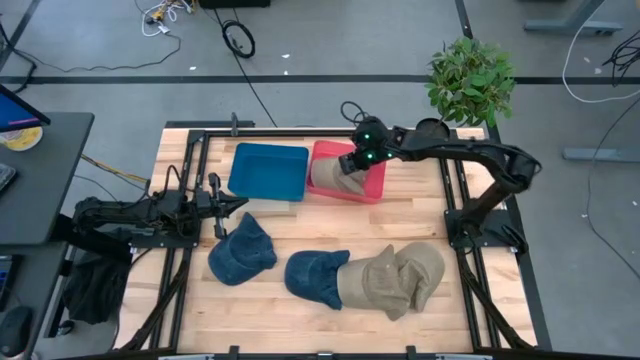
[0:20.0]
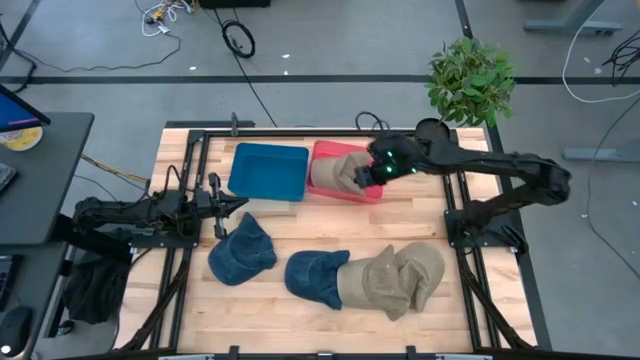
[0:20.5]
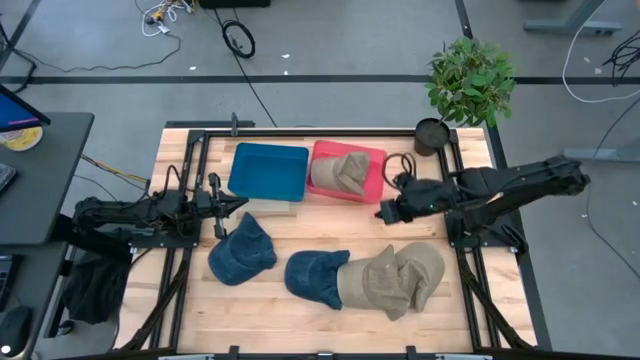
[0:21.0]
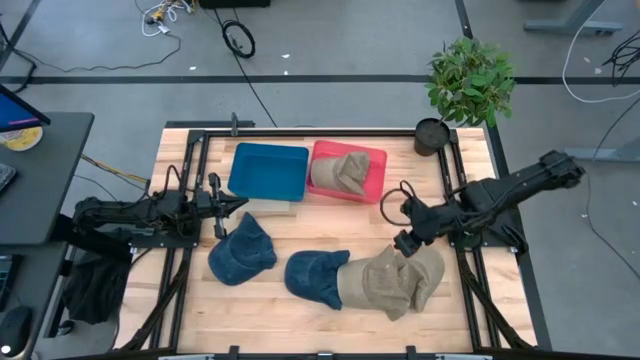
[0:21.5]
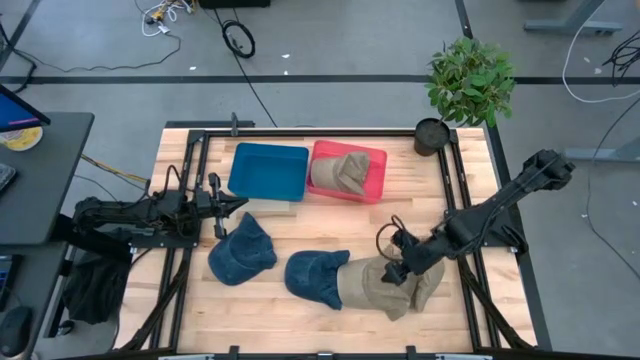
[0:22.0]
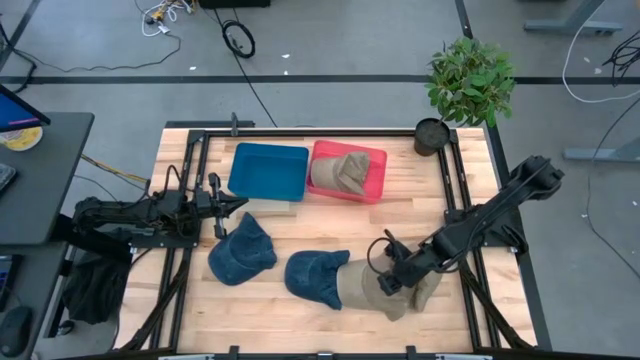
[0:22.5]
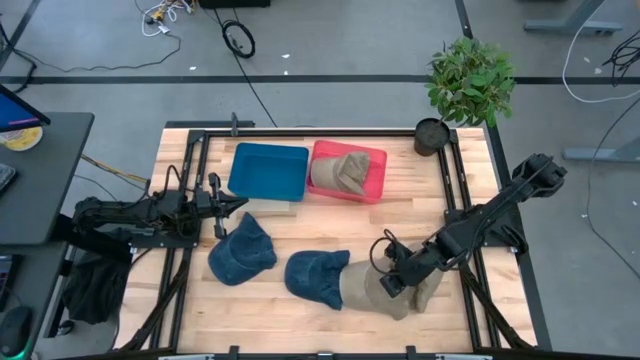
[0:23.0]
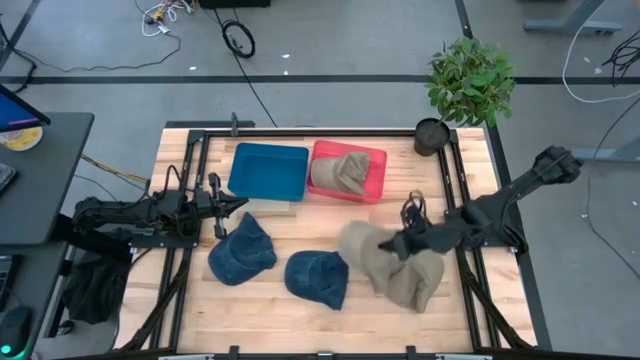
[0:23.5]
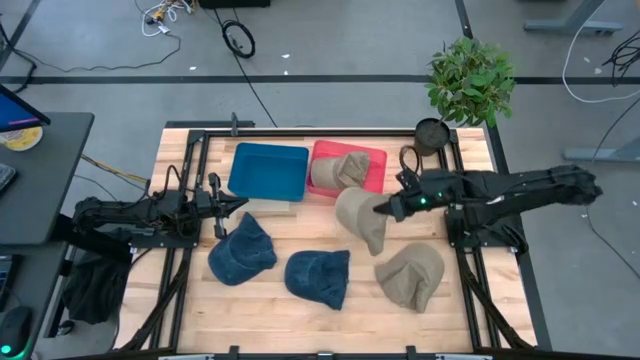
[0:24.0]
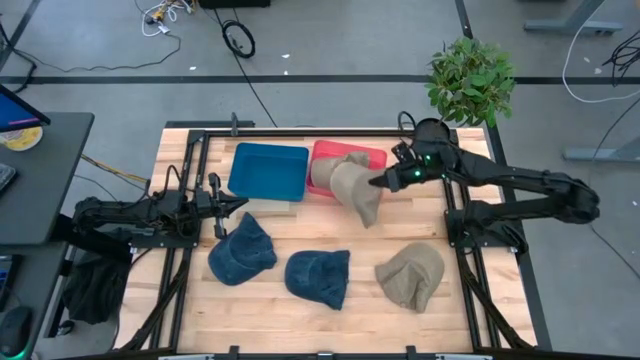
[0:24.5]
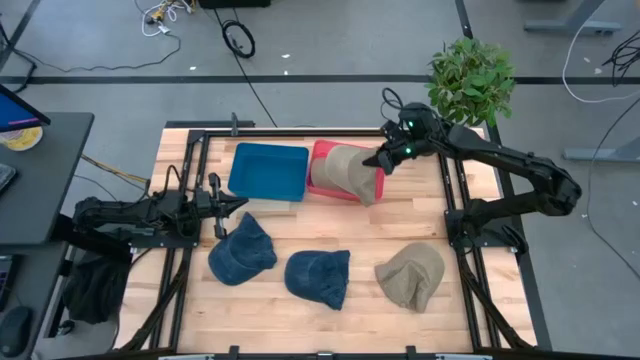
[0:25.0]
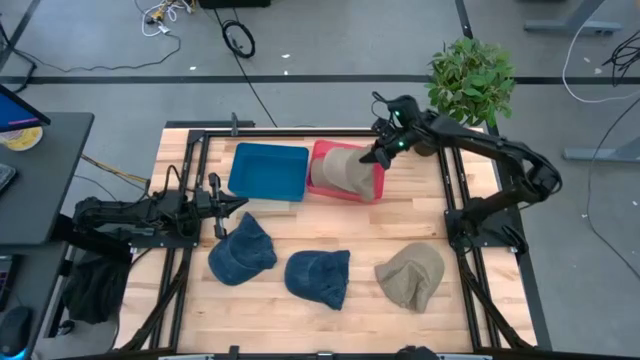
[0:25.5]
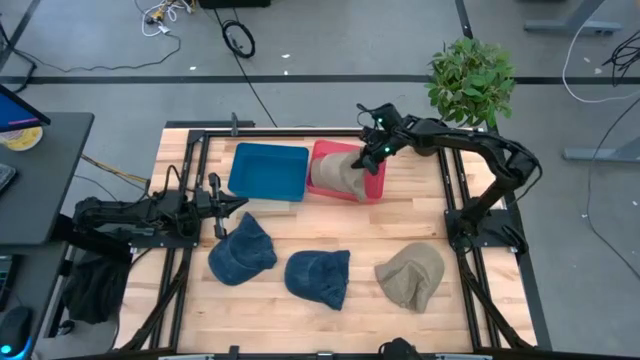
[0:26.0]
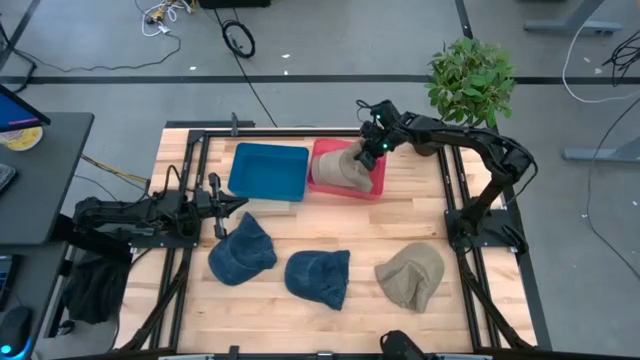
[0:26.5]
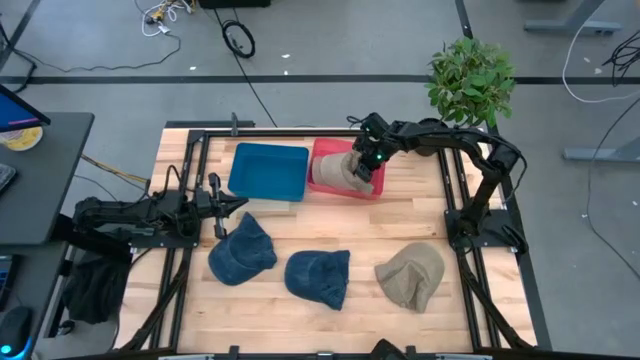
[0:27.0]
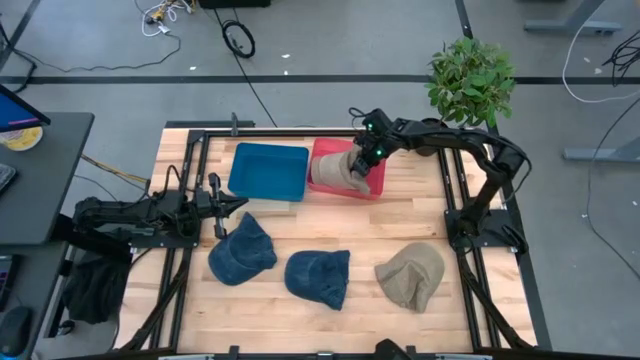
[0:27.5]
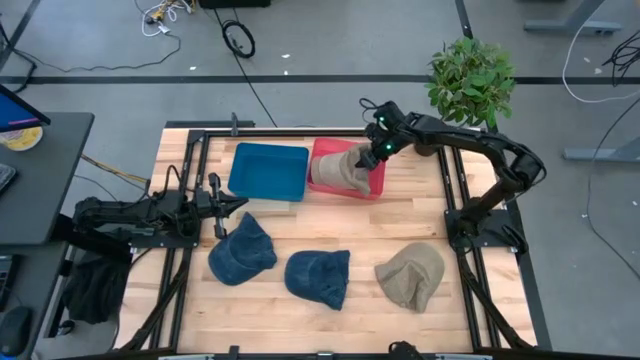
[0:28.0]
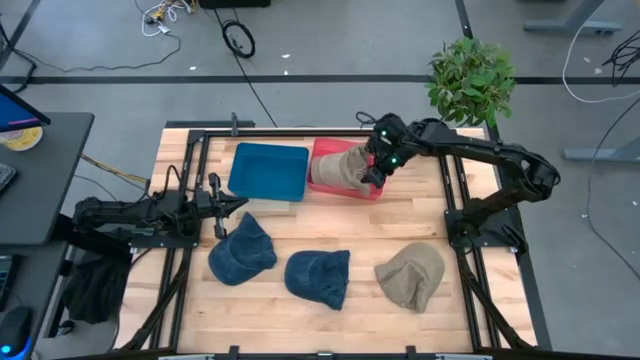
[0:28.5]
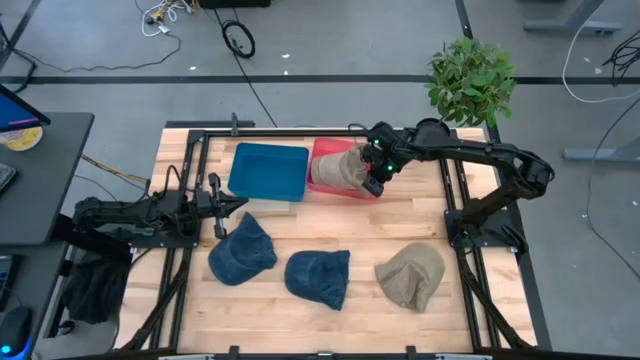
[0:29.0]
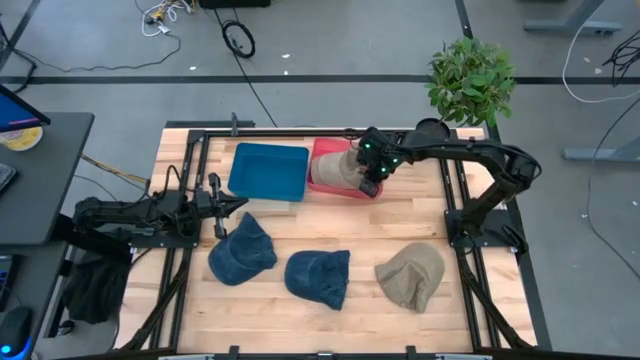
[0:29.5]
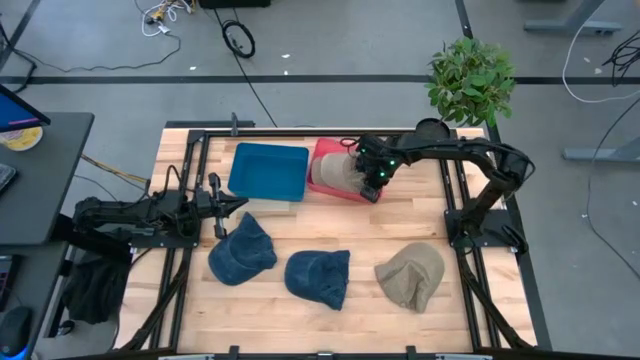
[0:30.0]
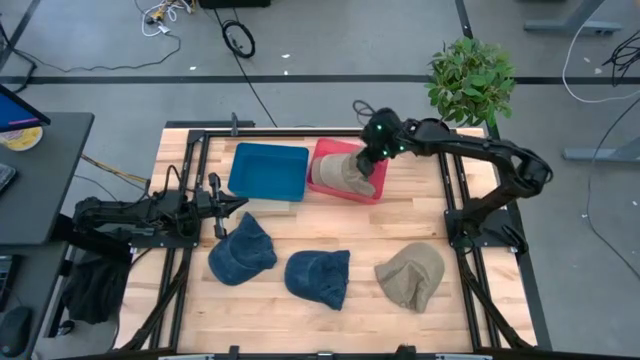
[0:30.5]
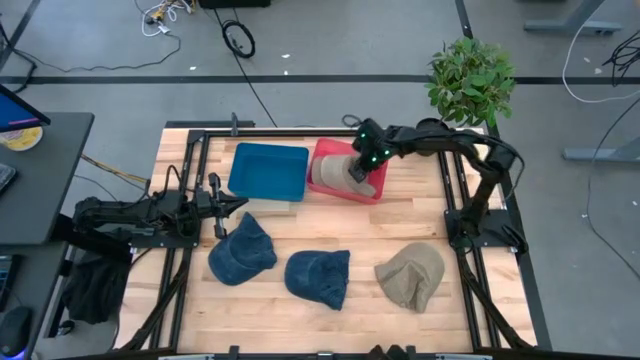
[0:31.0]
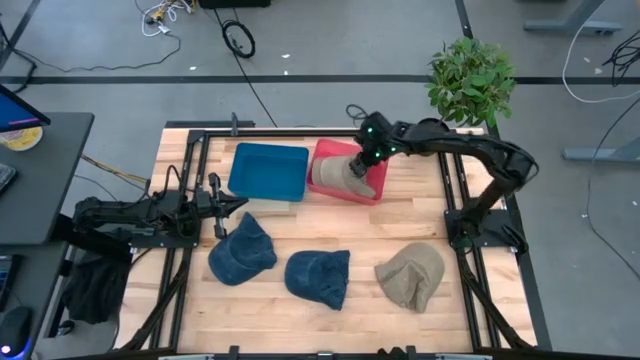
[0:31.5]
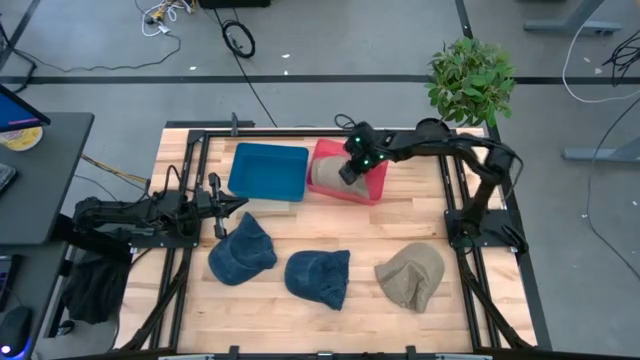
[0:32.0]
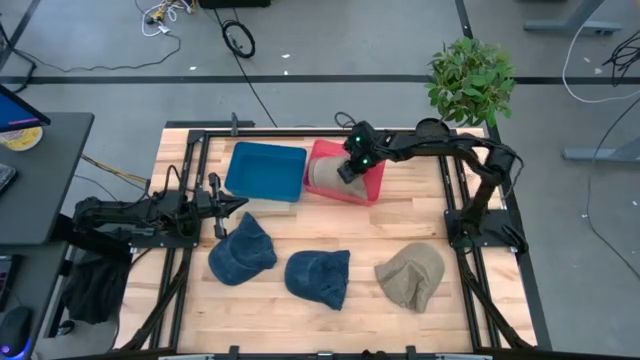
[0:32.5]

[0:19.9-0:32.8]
Task: Pick & Place hat
Put the left brown cap into the red bin

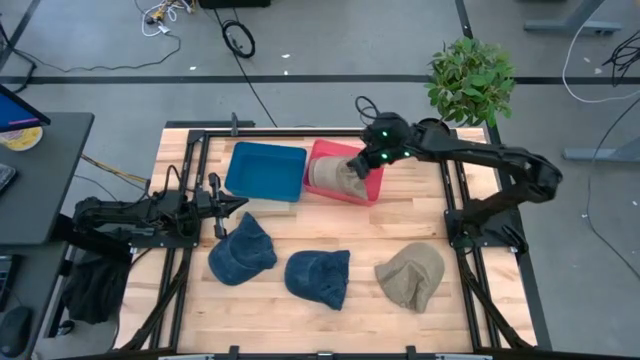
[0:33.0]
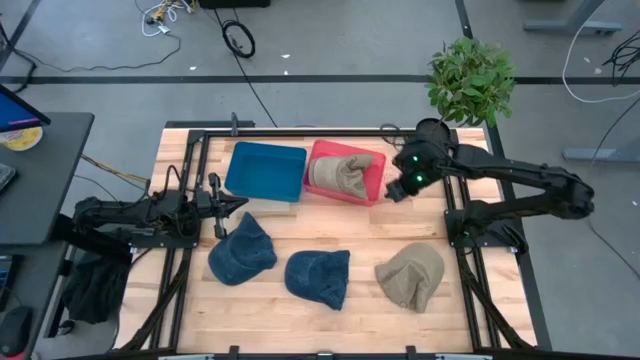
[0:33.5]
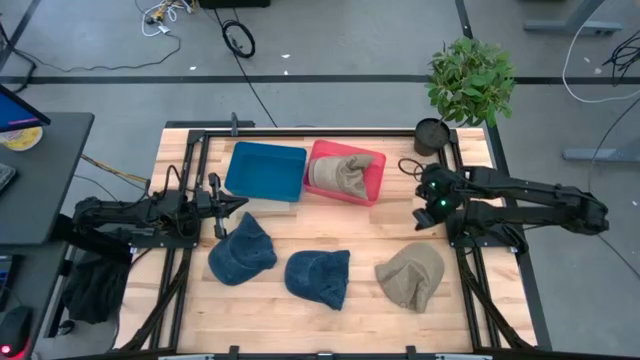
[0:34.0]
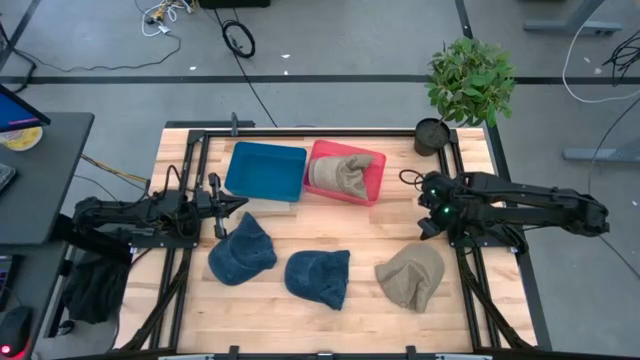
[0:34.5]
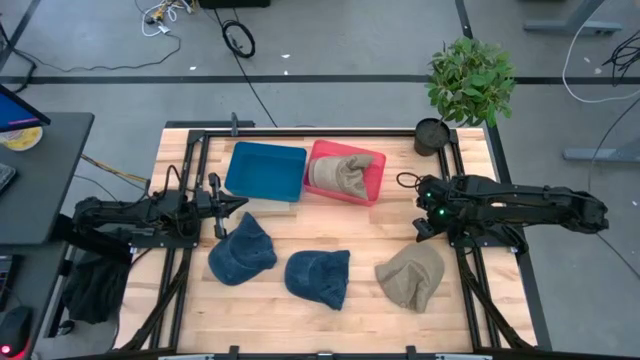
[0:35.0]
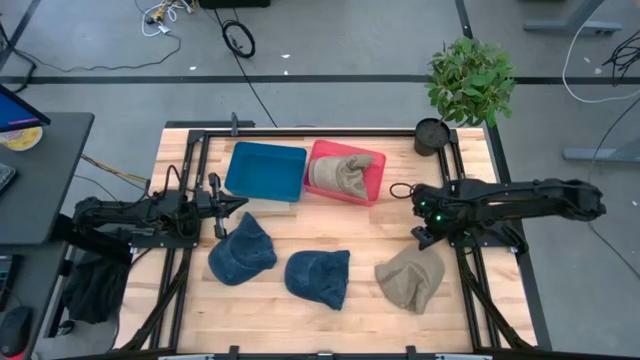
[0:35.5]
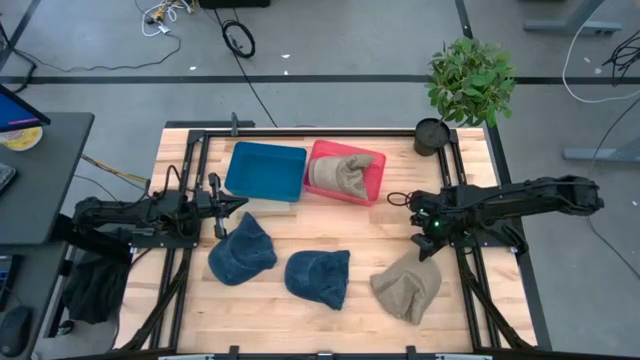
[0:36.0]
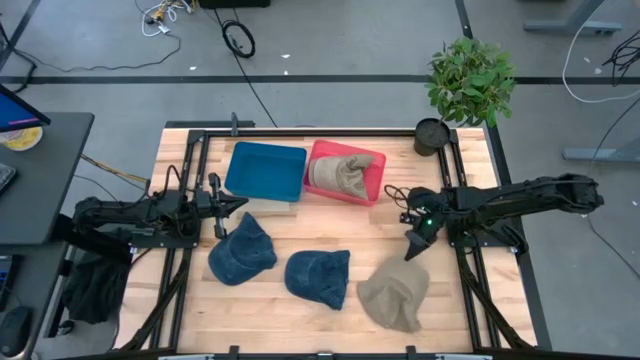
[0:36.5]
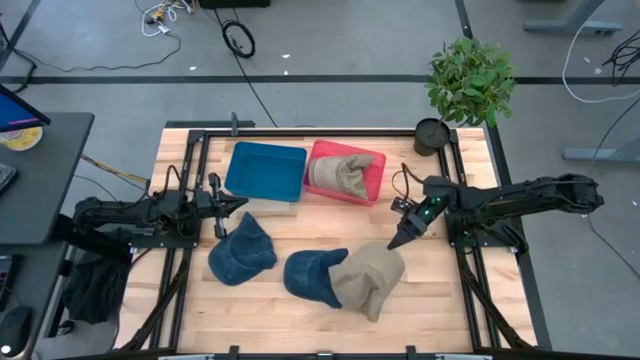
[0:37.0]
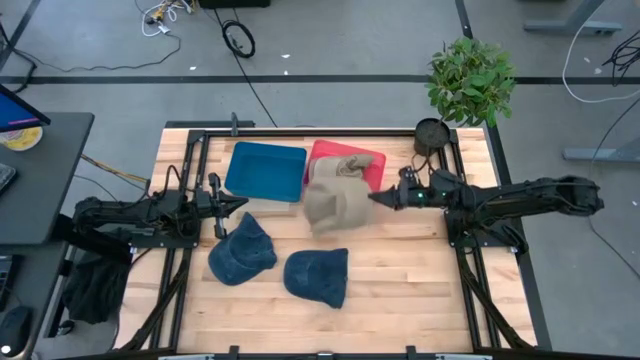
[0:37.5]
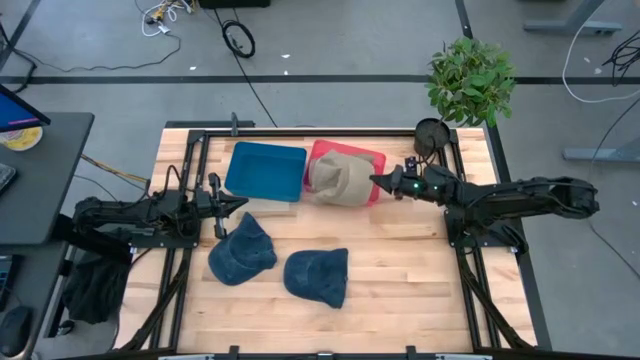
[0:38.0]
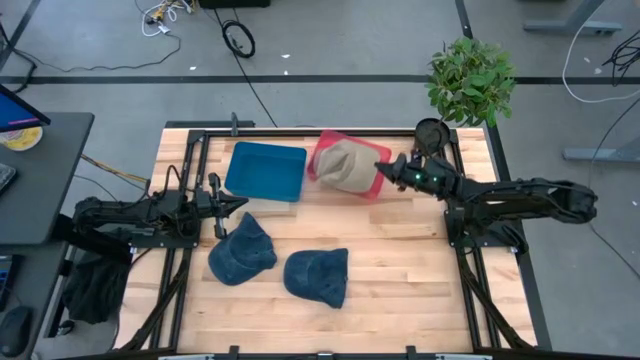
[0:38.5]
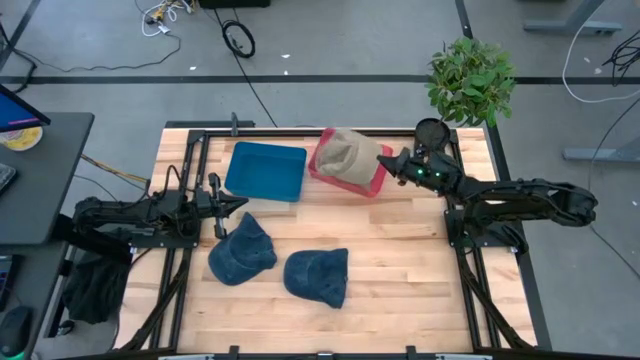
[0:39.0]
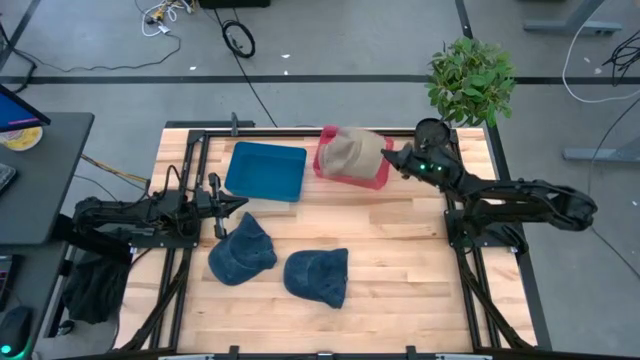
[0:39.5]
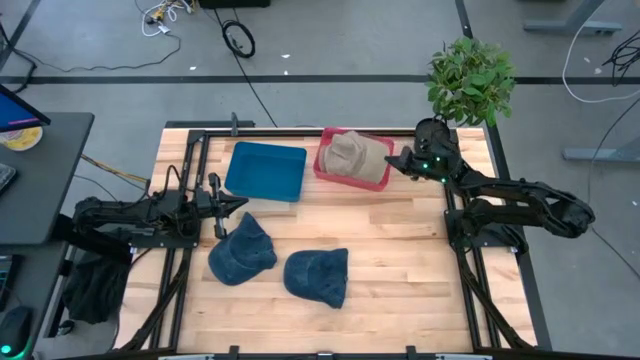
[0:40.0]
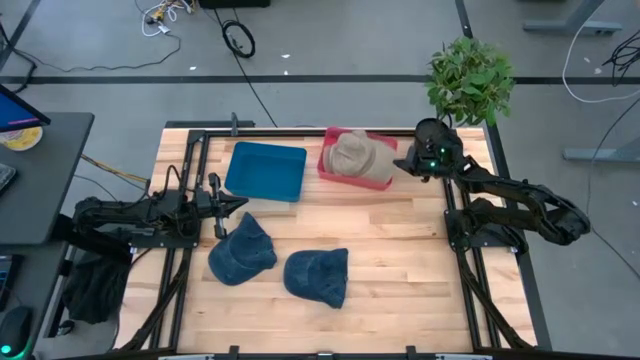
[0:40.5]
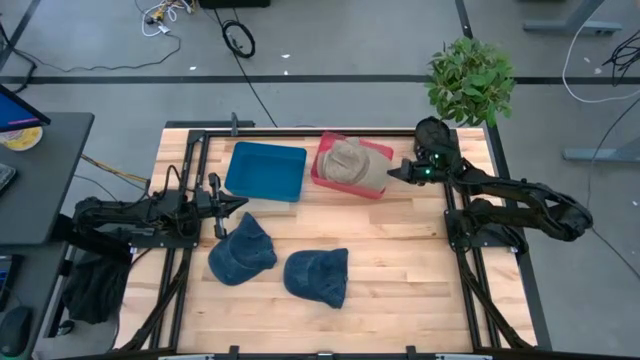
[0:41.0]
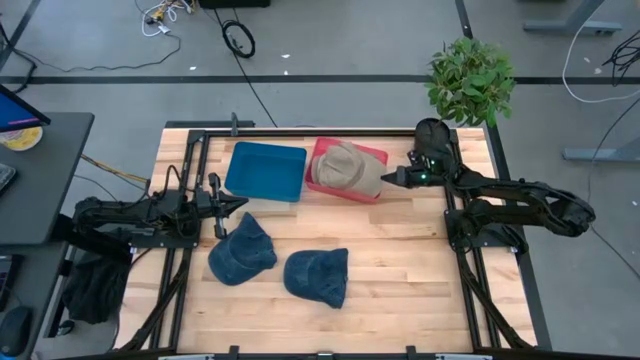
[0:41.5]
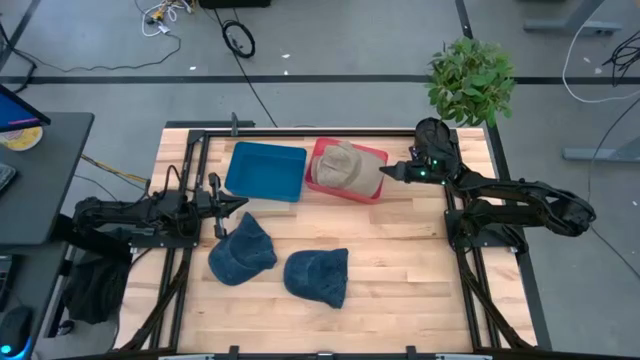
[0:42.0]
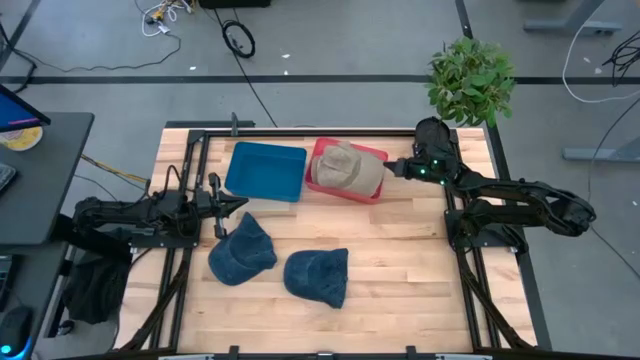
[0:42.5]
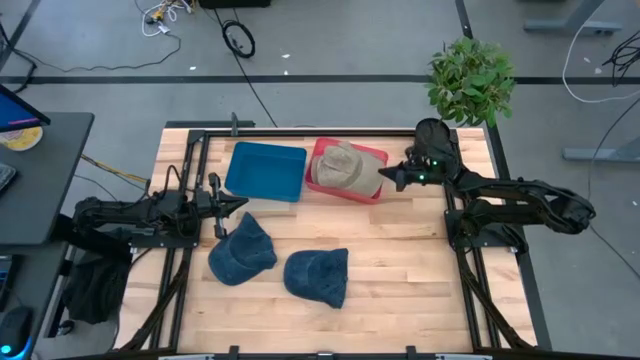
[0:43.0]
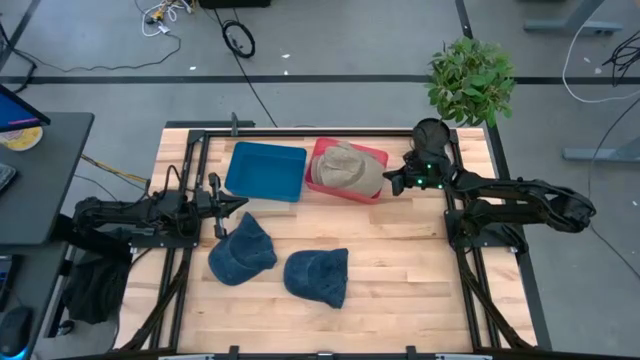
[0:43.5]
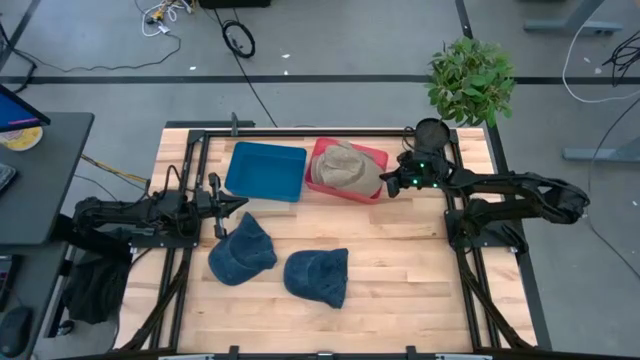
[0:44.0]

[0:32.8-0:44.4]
Put the brown cap into the red bin
